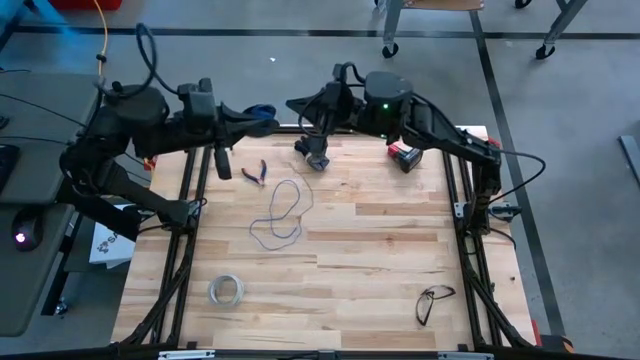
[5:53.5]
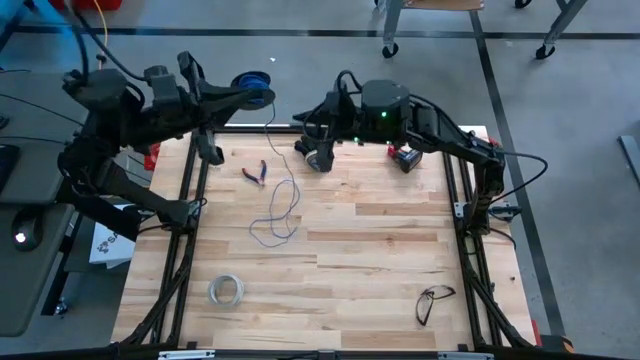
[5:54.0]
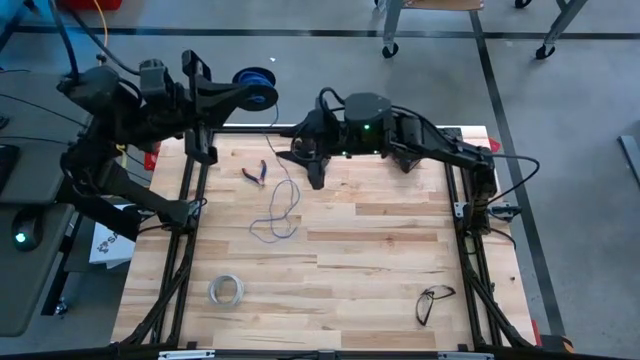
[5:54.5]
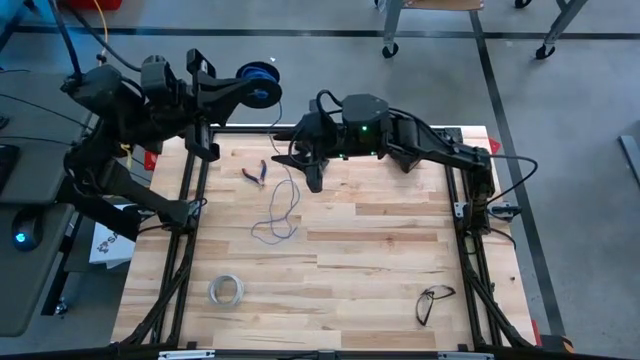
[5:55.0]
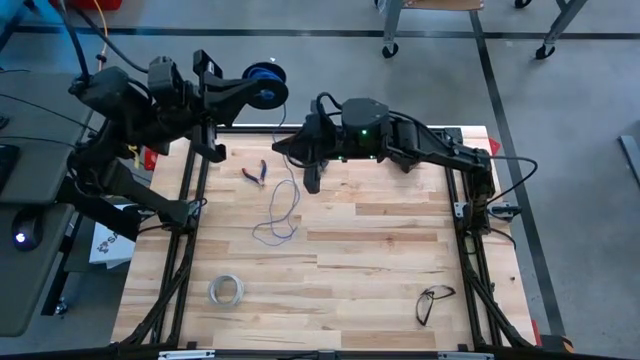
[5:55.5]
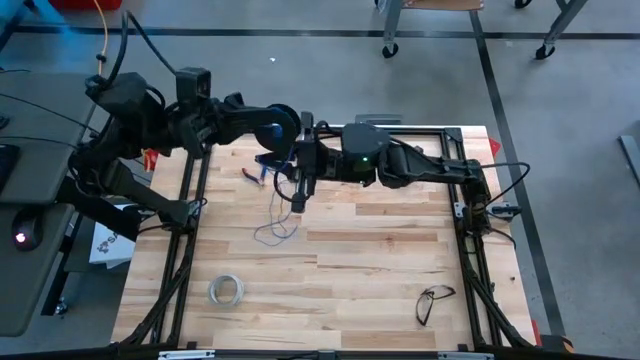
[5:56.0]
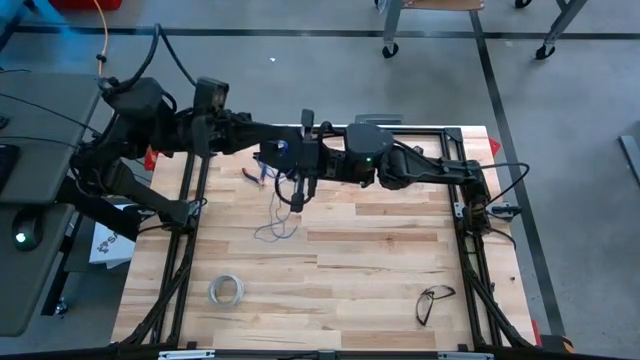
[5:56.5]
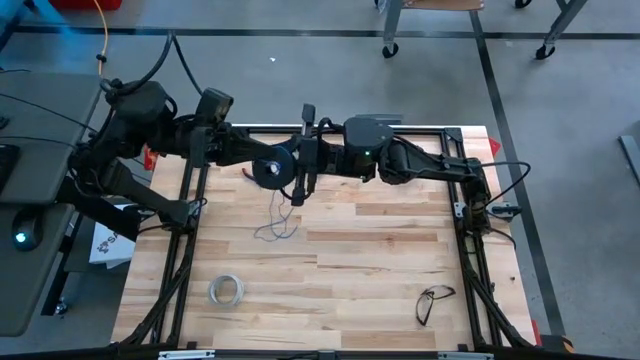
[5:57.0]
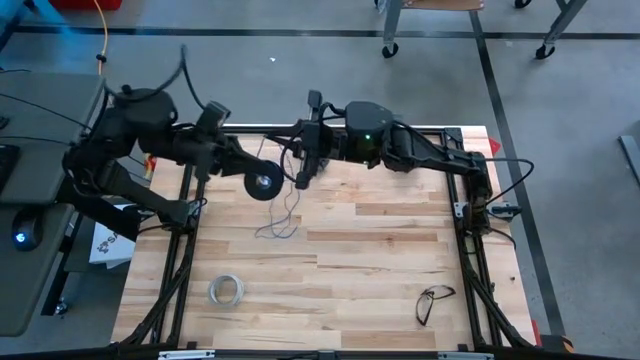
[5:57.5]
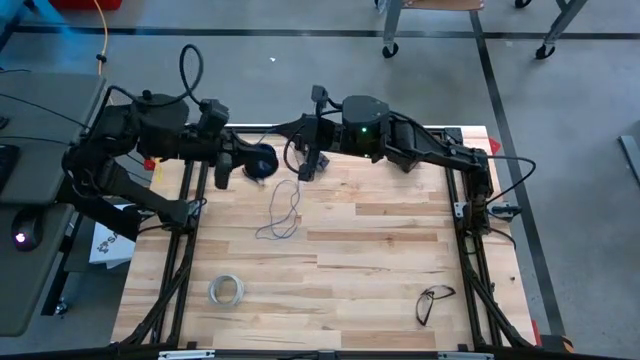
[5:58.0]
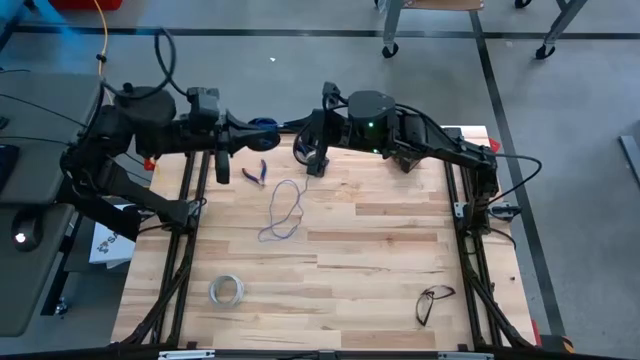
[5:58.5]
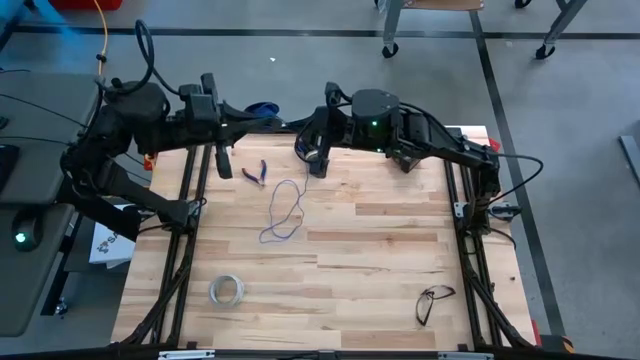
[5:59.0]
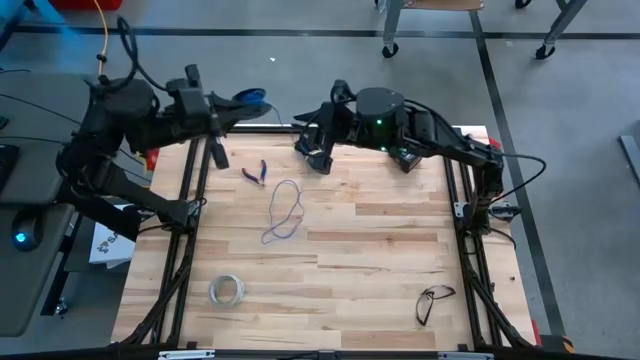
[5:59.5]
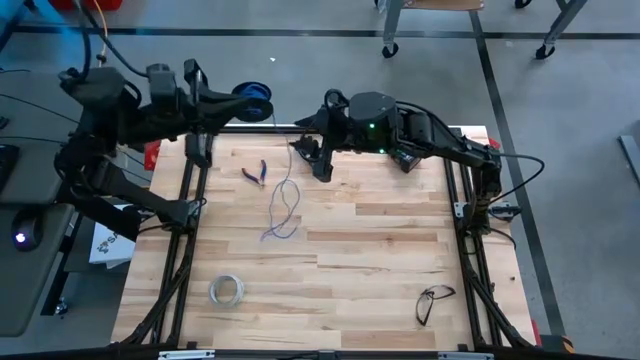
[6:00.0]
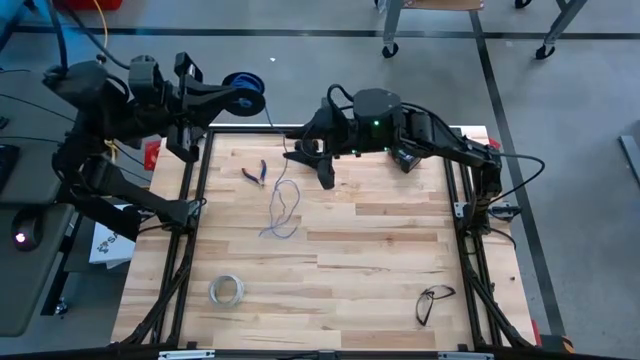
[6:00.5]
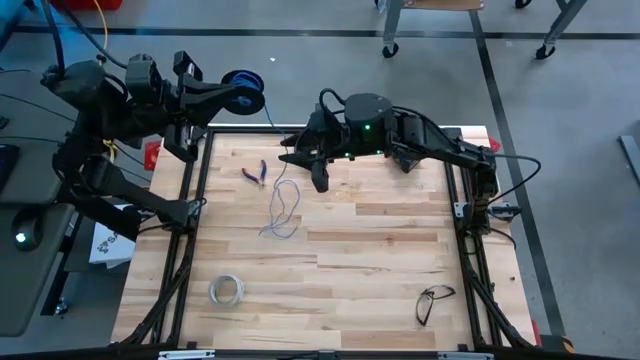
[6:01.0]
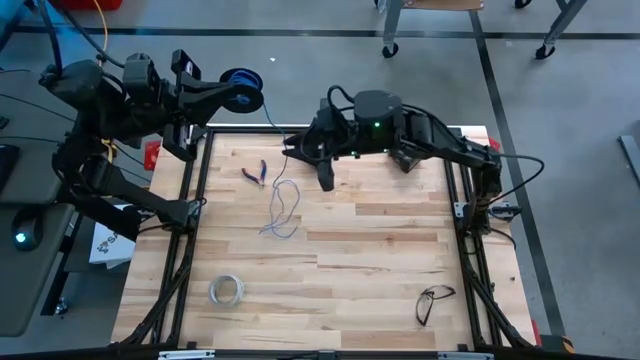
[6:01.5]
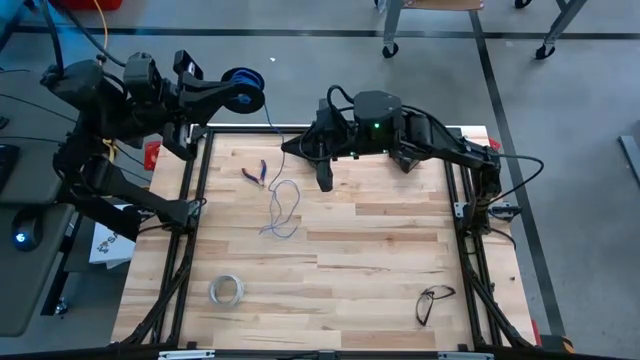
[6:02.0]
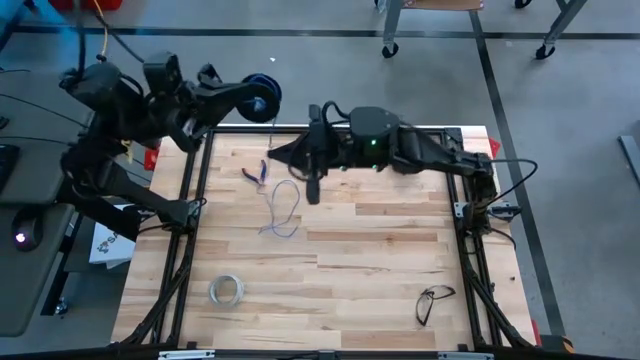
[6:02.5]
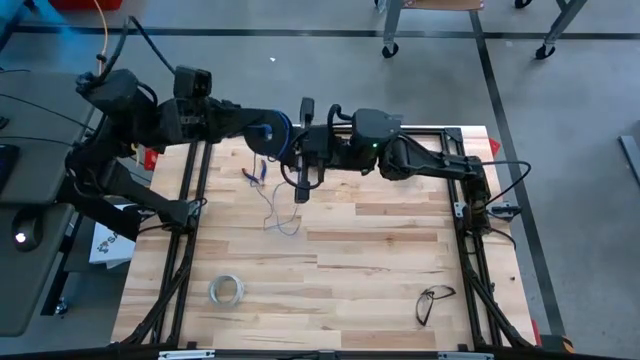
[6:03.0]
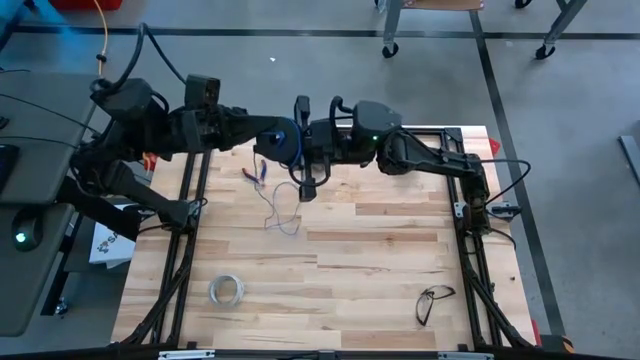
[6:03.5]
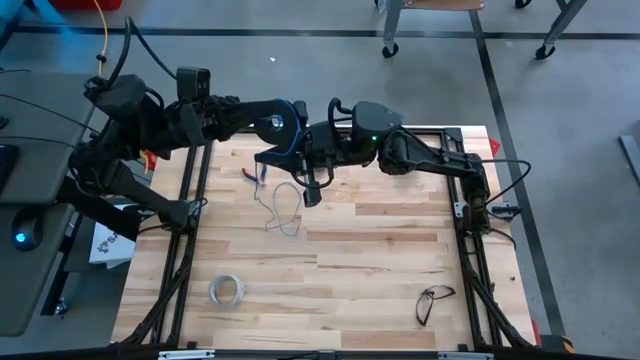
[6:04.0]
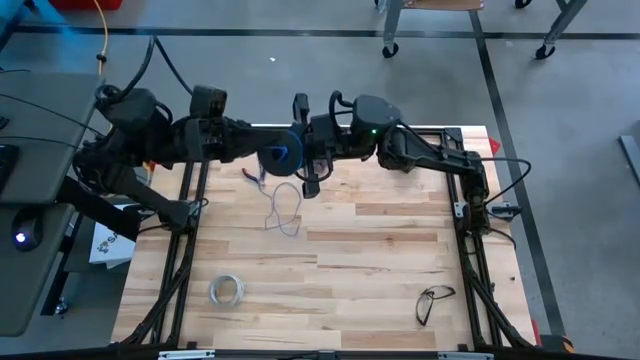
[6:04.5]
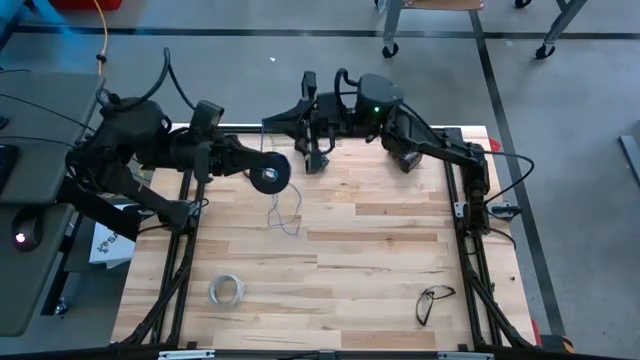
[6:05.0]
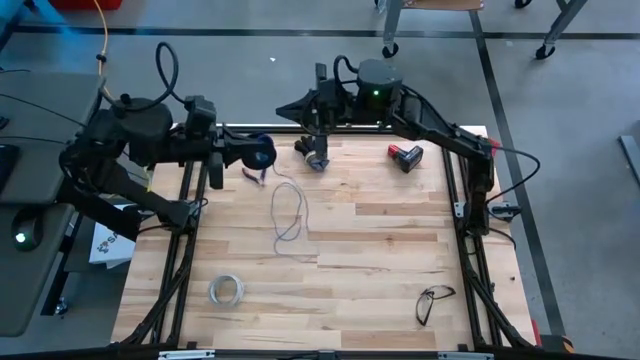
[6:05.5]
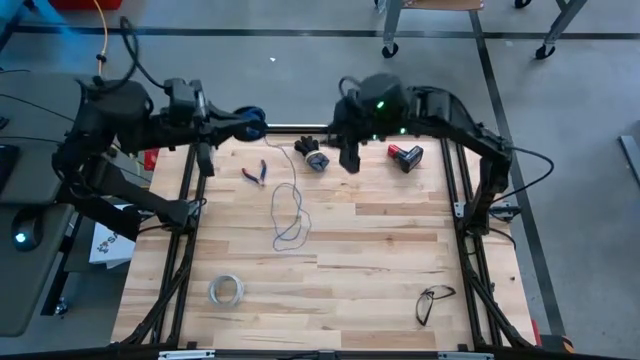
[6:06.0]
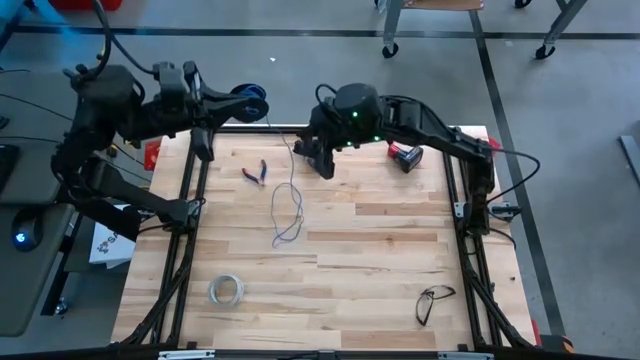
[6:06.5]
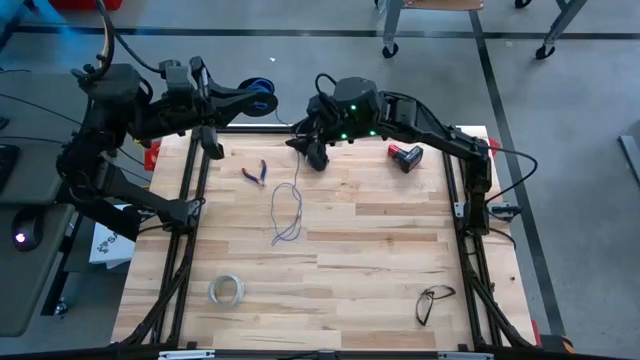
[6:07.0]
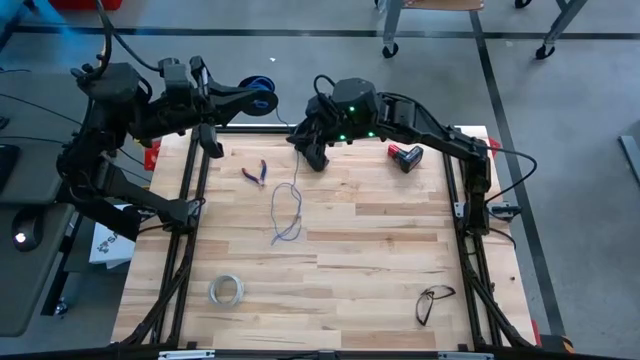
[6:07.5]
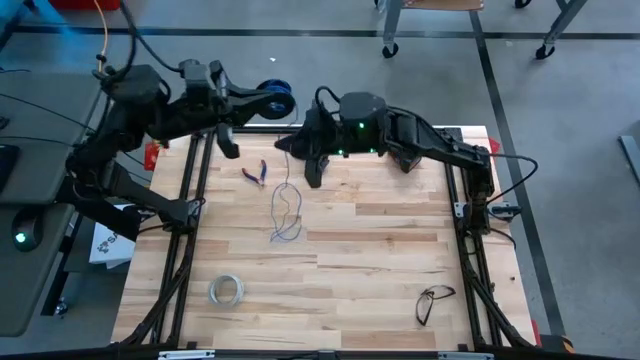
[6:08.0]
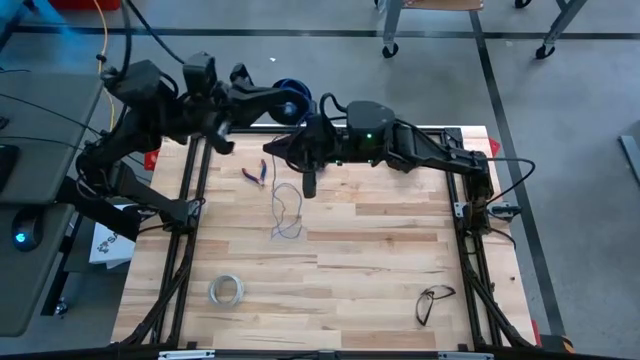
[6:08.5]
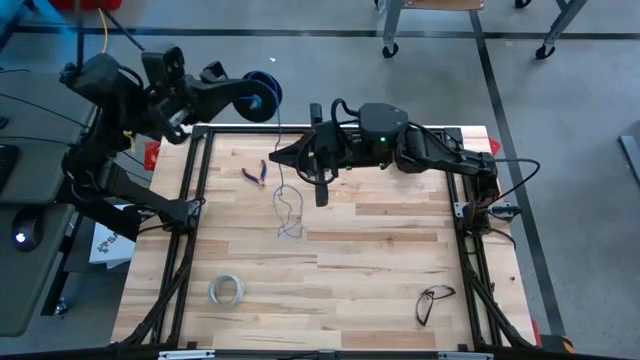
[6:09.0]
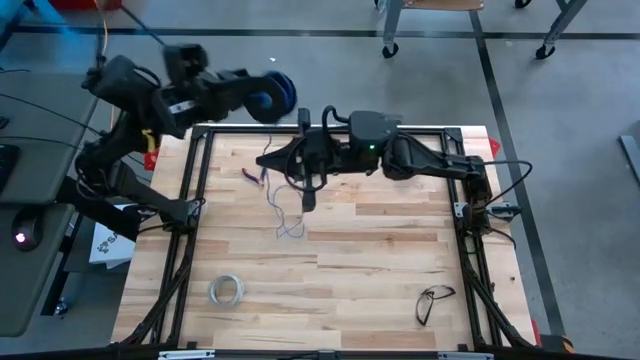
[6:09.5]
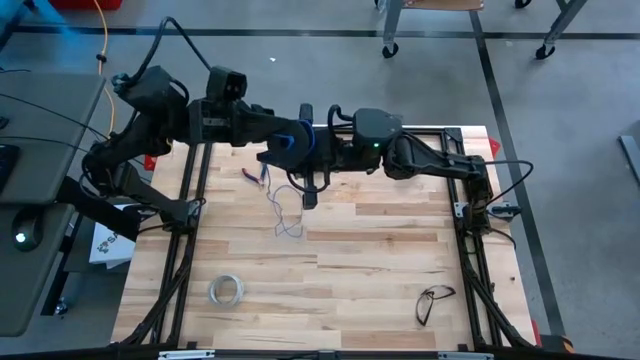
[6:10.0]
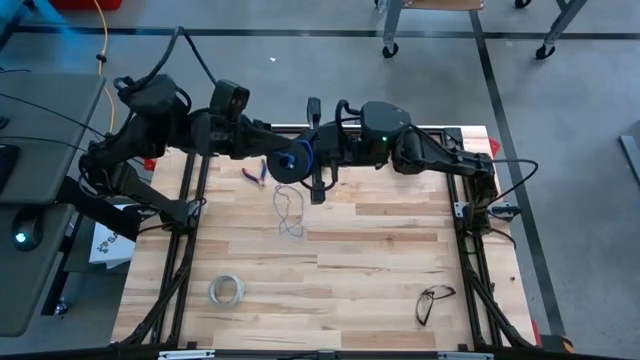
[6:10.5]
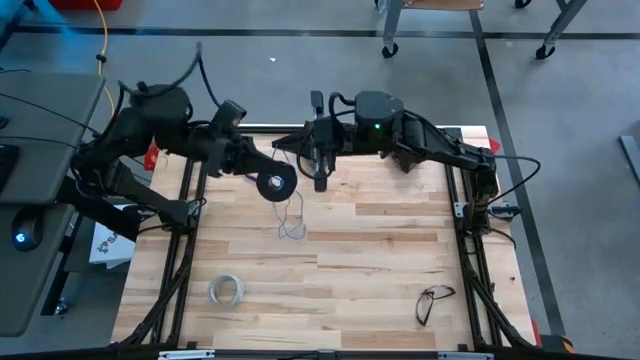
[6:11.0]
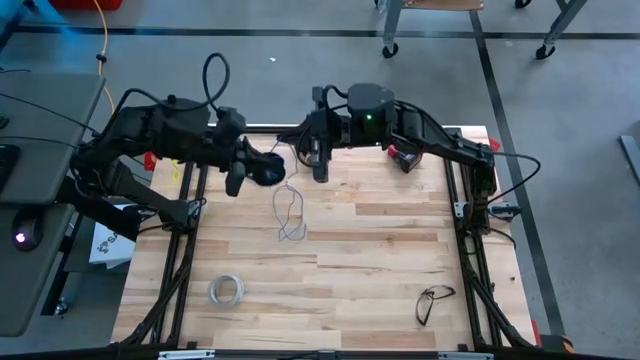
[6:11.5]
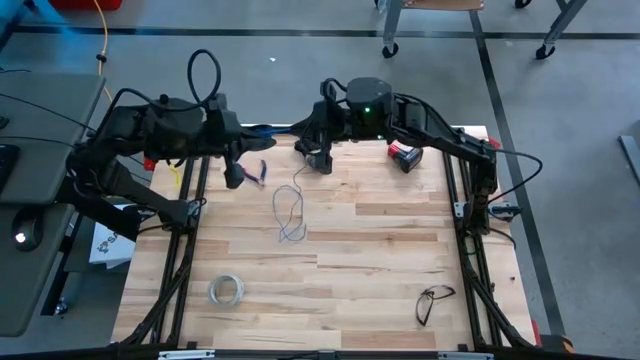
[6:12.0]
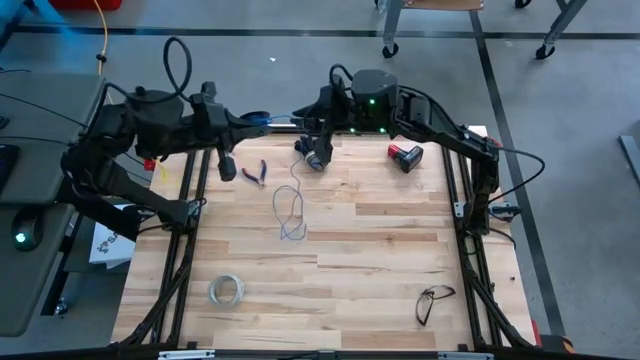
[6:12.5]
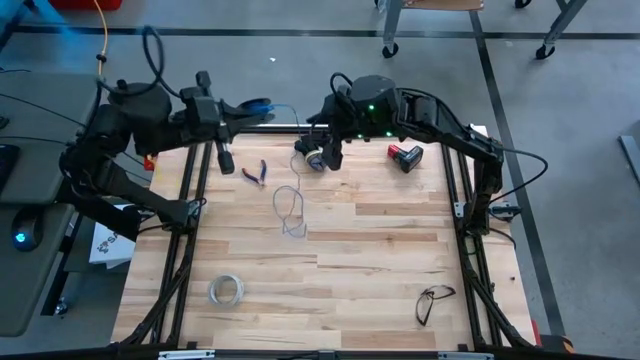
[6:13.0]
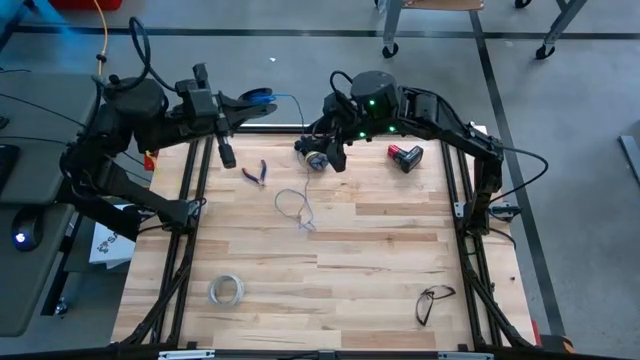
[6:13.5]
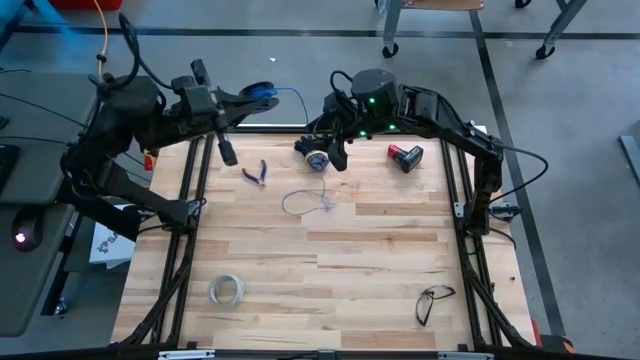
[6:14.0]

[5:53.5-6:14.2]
Task: Coil cords
Coil the blue wire onto the black spool
